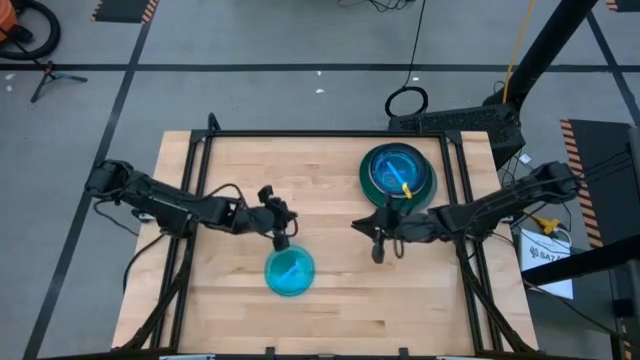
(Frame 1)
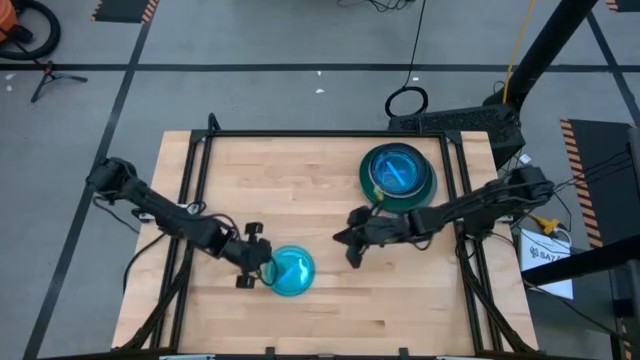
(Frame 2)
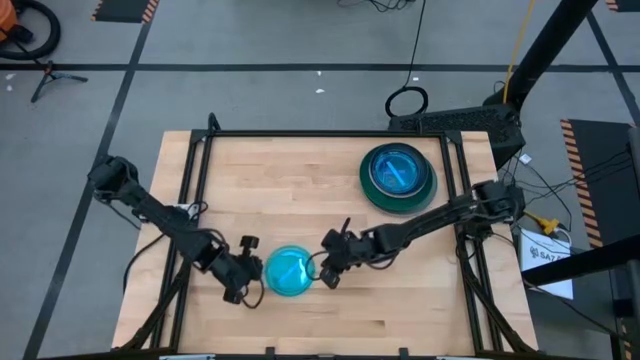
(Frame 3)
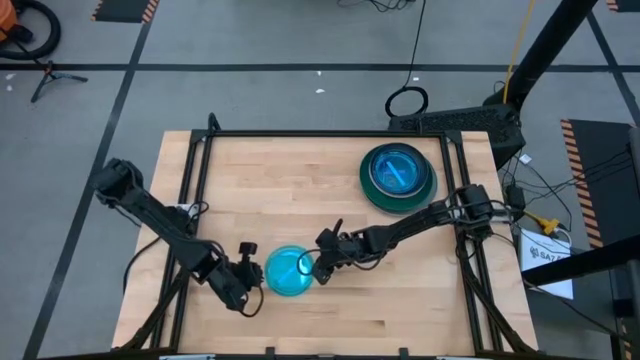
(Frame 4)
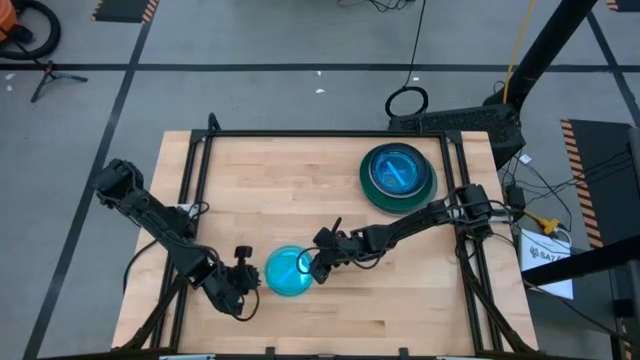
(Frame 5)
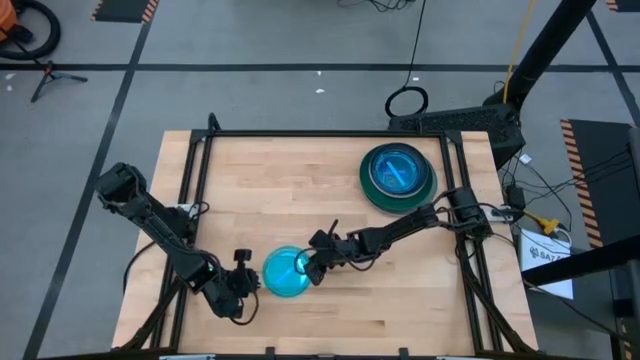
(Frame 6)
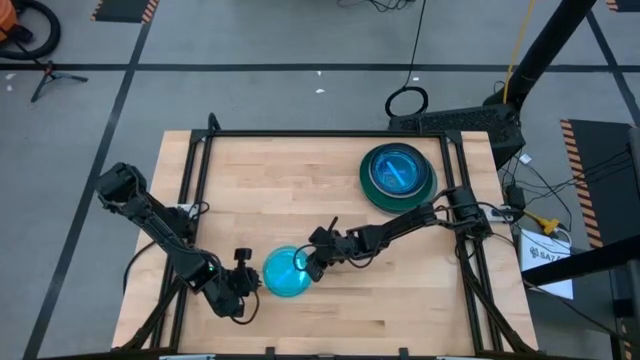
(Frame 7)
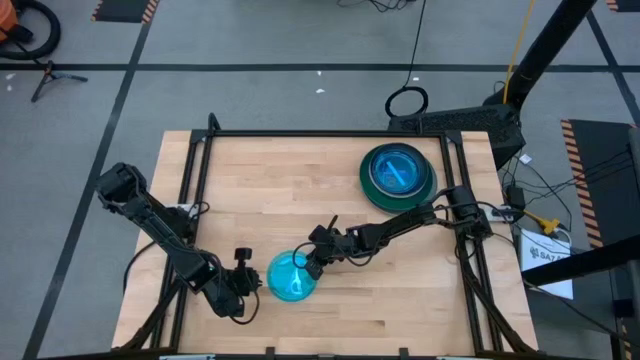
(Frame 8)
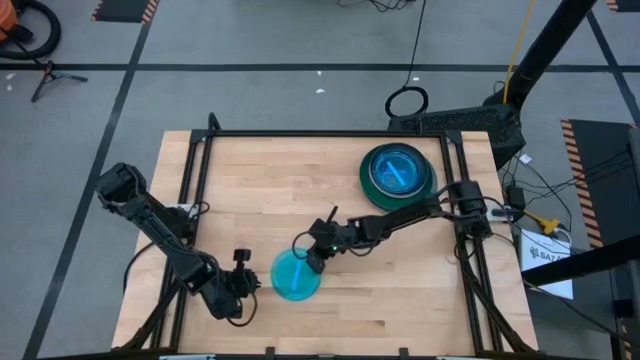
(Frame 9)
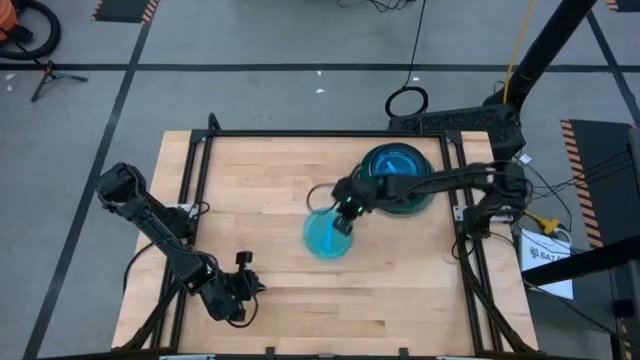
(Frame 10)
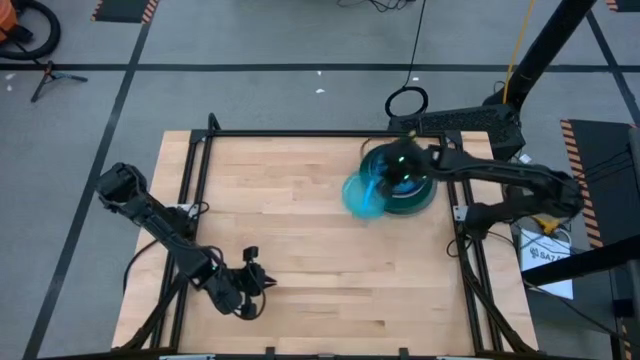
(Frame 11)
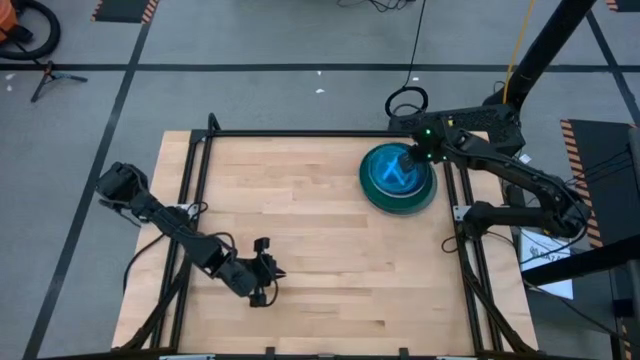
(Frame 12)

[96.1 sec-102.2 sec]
Task: Stack plastic plates
Stack the blue plate on the blue plate

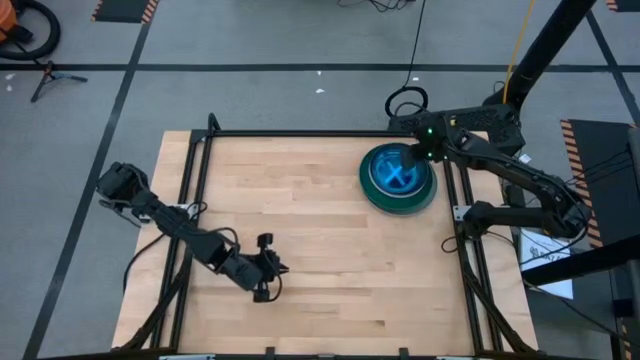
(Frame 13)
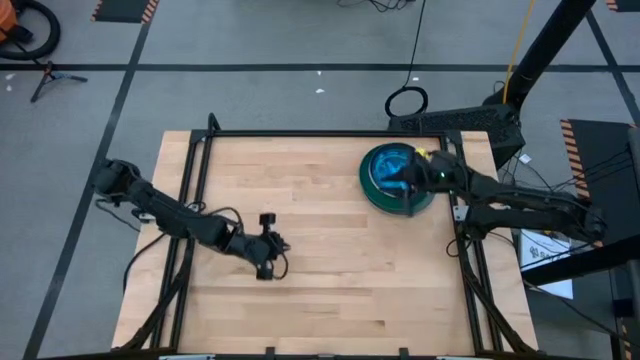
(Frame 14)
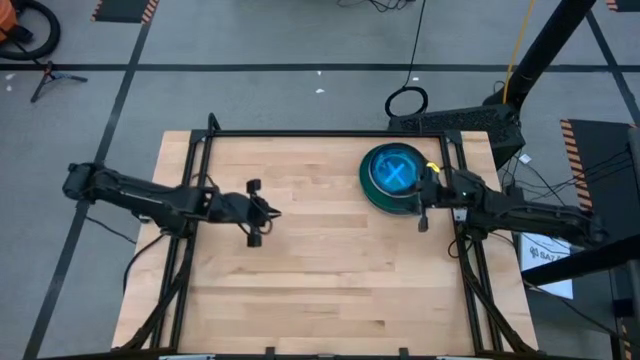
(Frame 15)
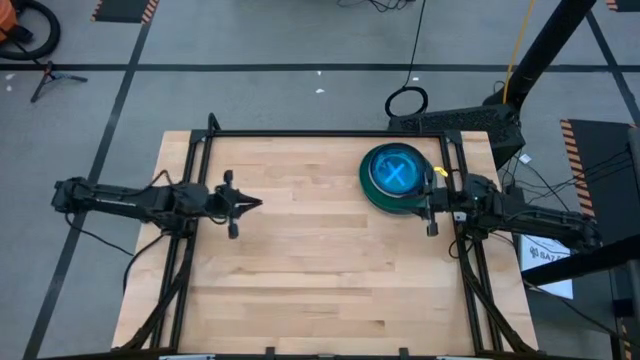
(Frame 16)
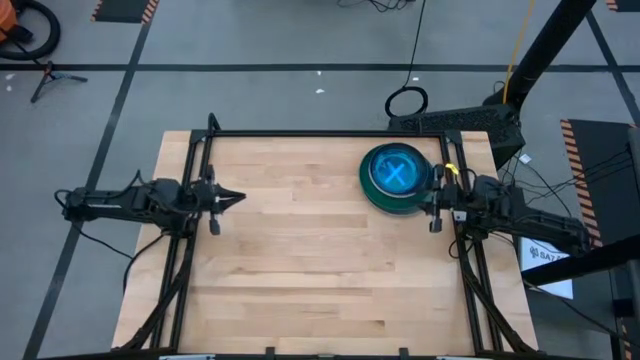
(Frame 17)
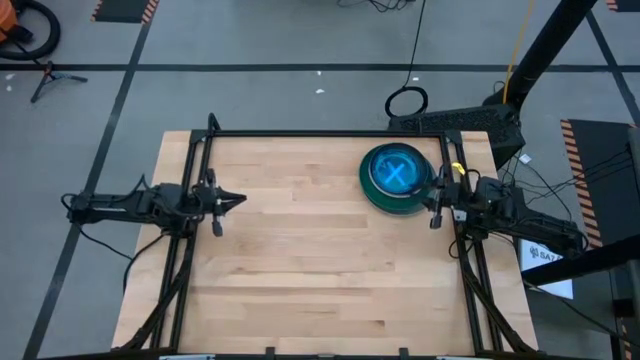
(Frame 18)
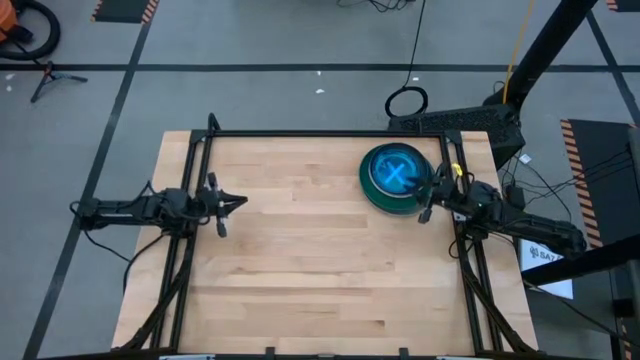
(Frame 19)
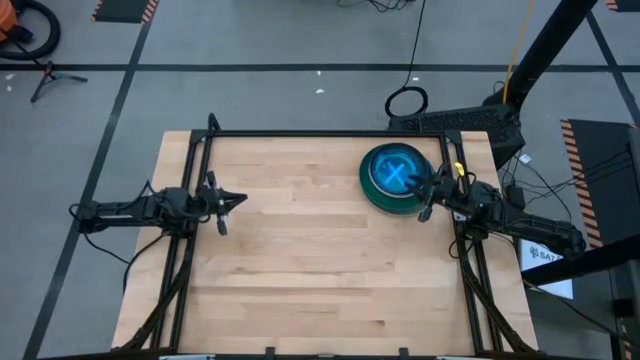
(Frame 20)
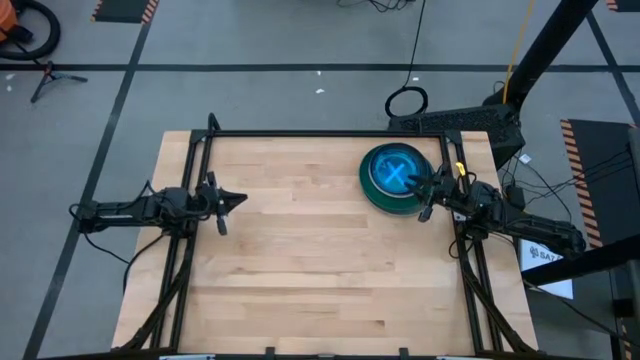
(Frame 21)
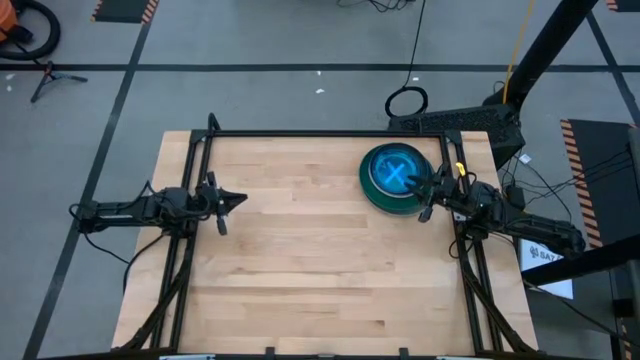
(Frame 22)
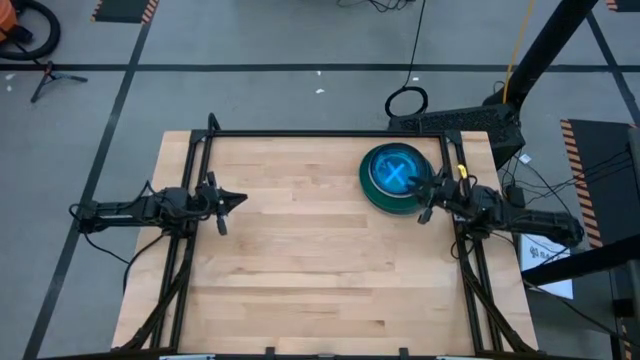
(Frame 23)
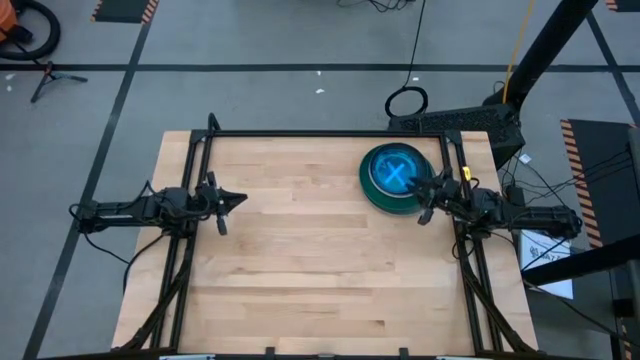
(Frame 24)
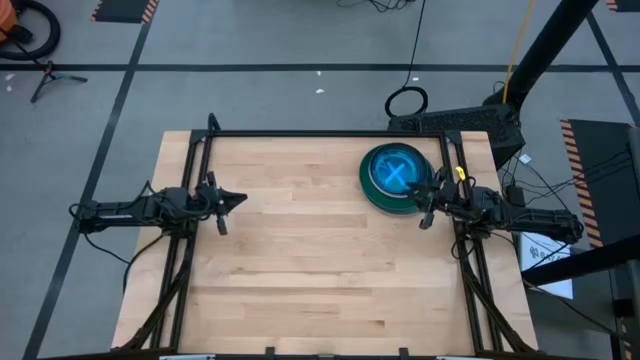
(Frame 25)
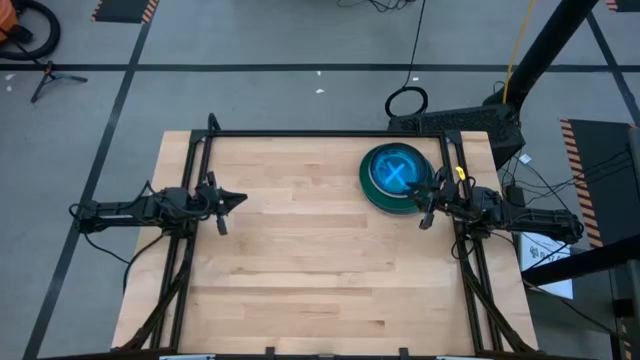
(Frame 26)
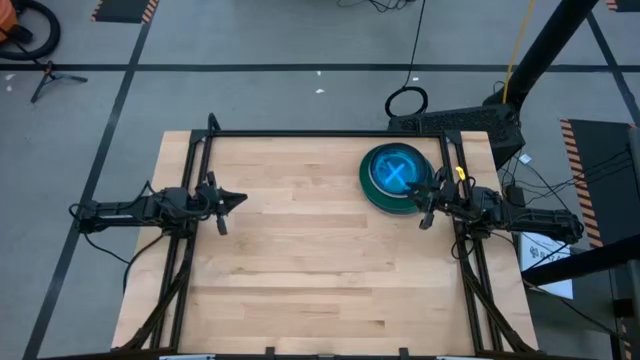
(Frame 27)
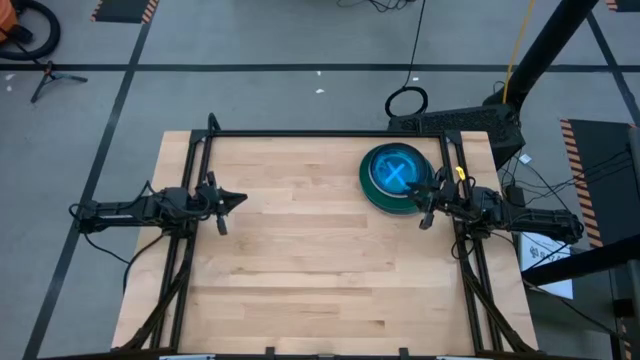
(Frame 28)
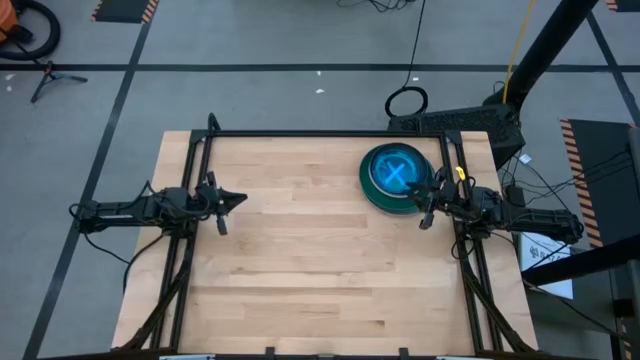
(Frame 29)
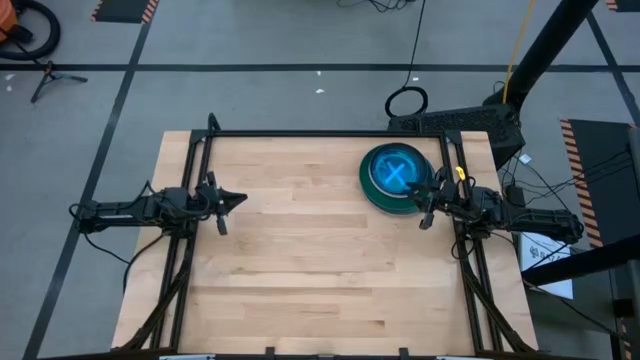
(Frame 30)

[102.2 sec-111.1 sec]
Return to Home Position

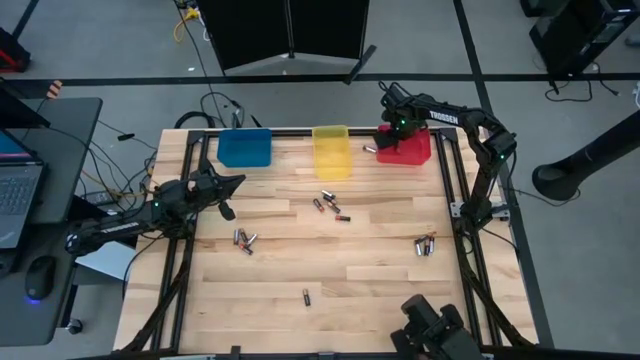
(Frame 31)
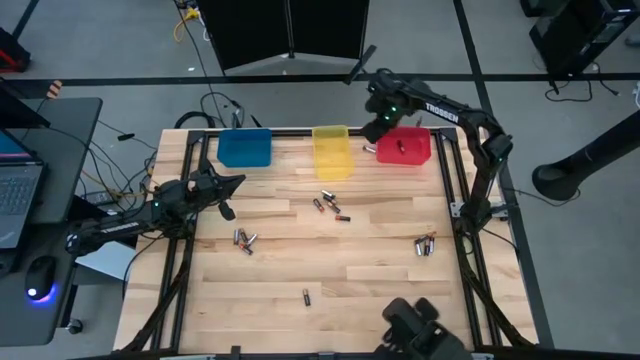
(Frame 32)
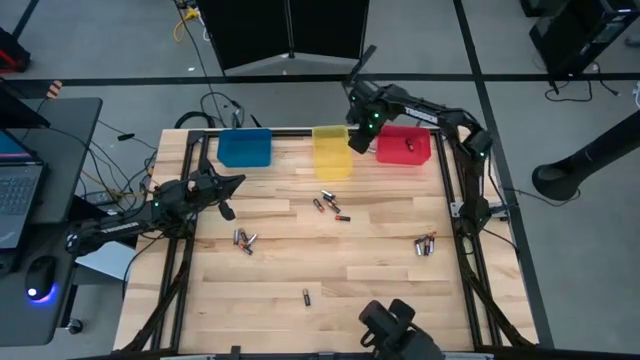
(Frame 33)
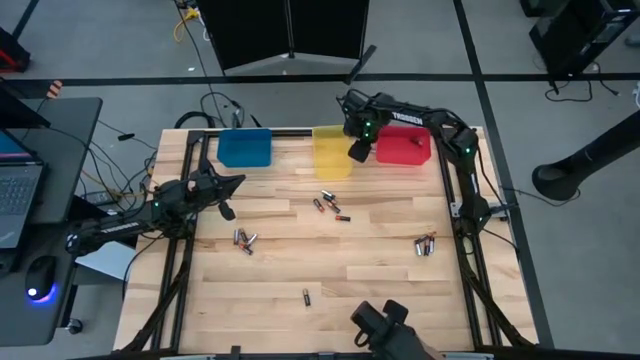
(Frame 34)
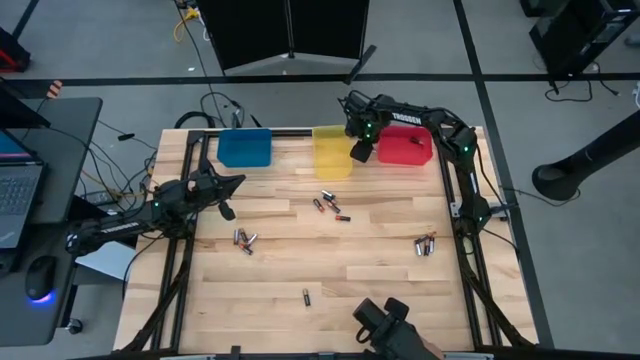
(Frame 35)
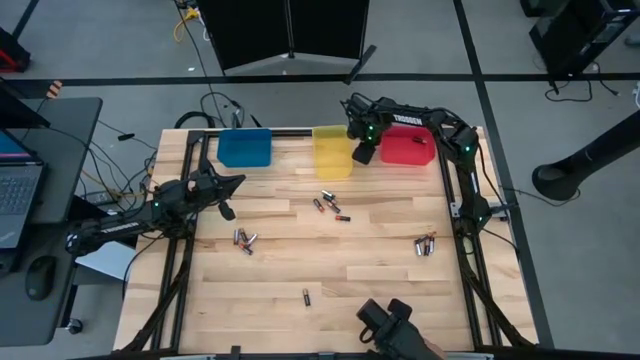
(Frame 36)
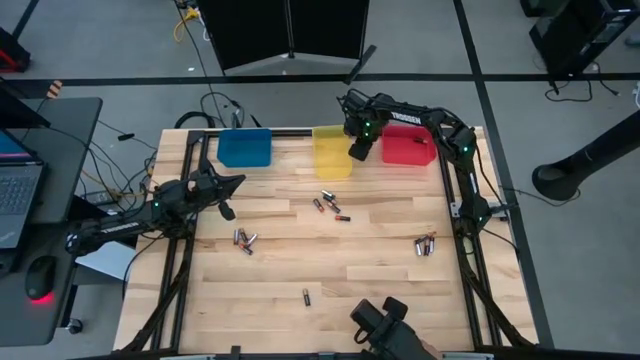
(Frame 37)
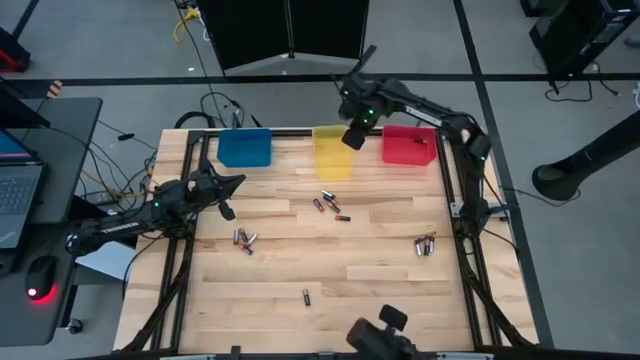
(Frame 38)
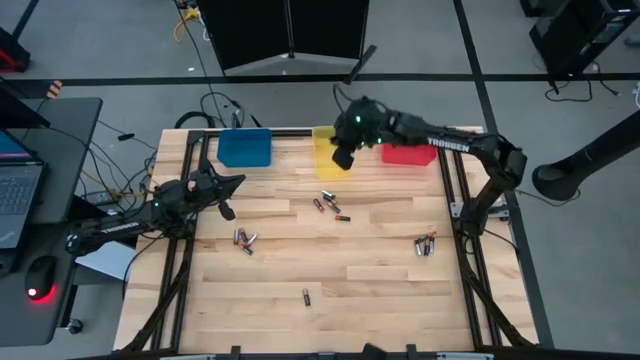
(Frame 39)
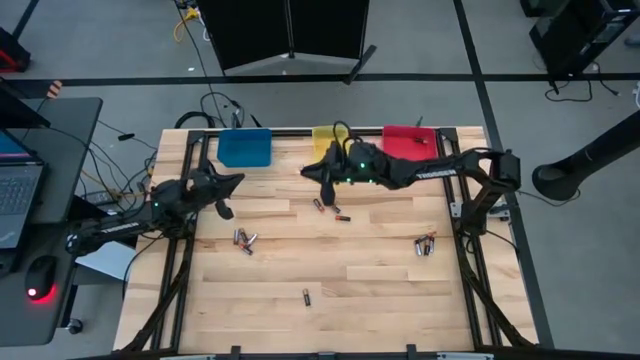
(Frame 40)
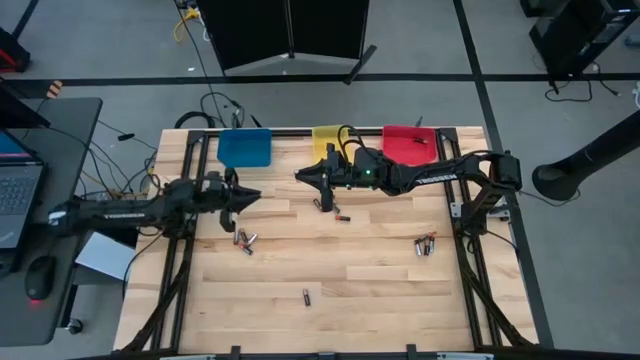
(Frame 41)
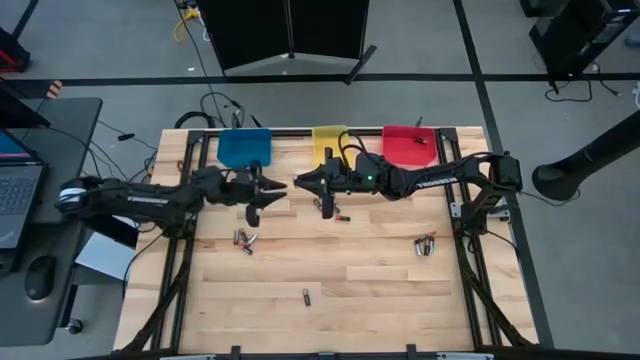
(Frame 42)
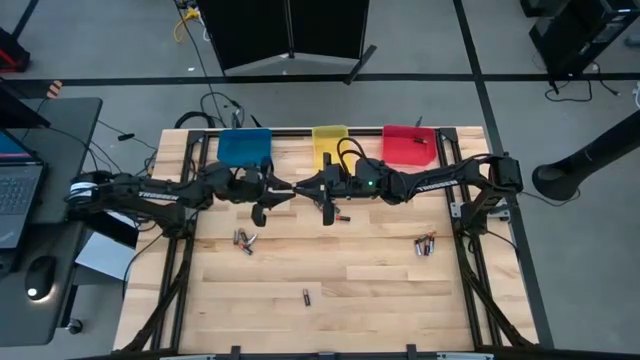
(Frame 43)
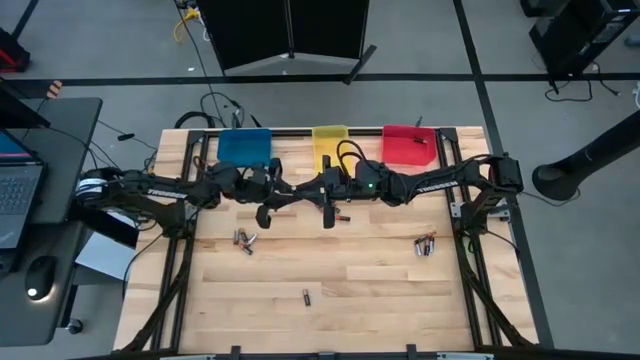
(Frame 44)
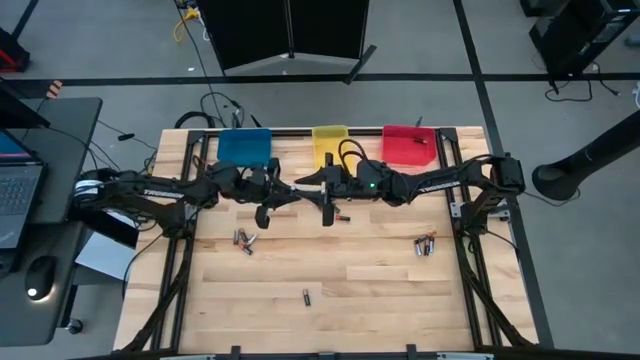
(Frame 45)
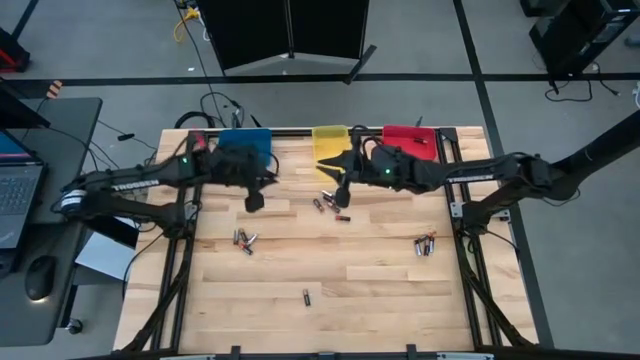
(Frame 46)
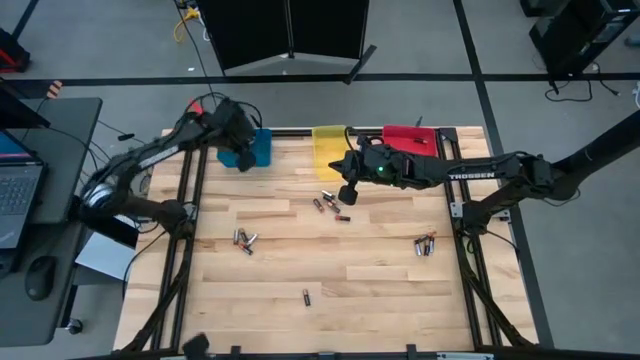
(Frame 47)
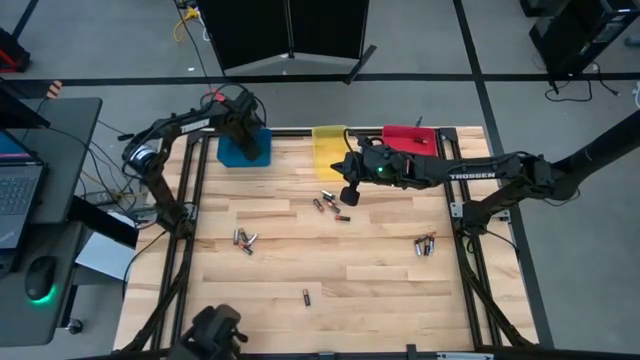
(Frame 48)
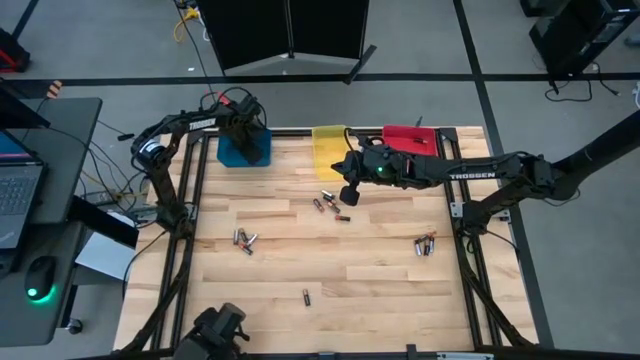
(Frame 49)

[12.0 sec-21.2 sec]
Task: Sort batteries
Put the silver battery into the blue bin
